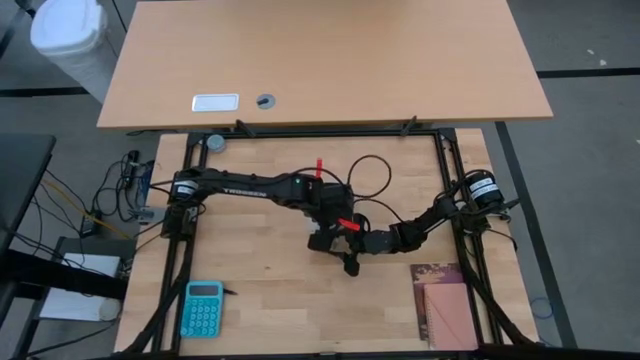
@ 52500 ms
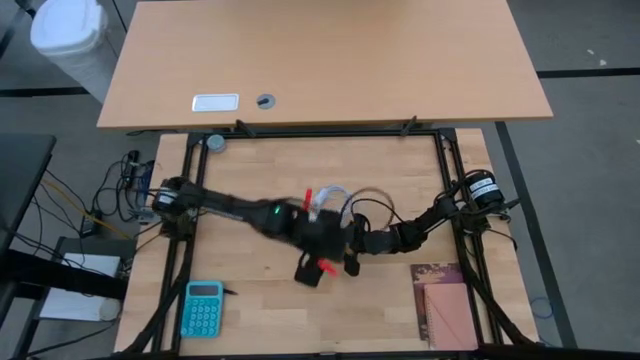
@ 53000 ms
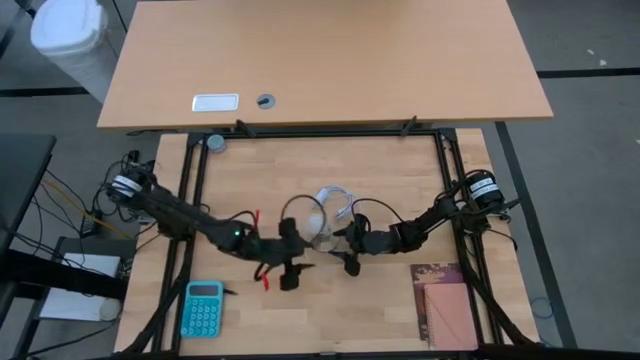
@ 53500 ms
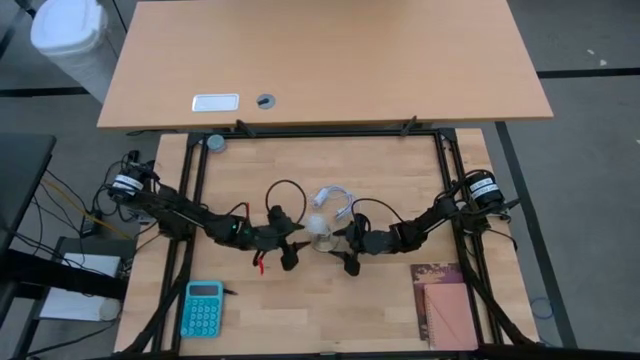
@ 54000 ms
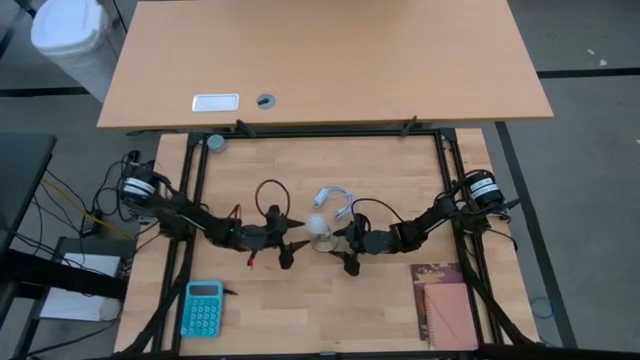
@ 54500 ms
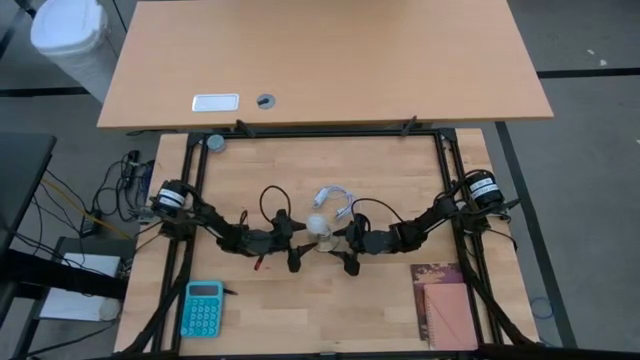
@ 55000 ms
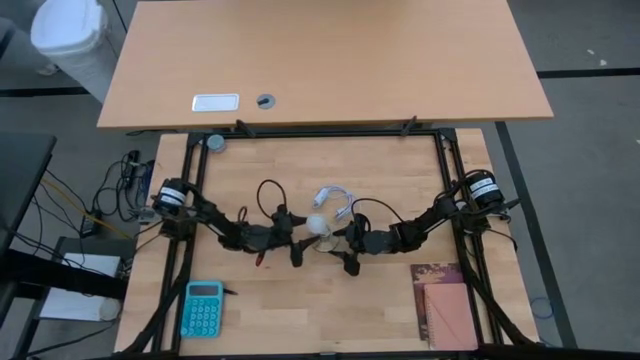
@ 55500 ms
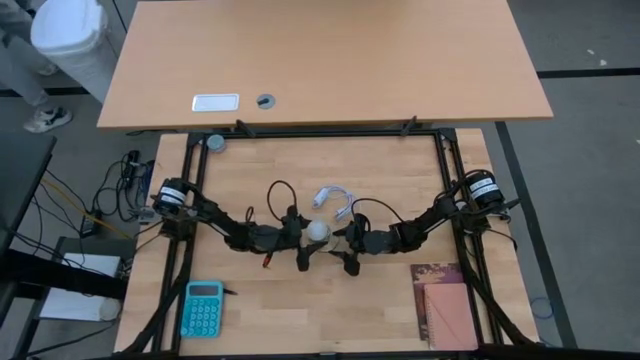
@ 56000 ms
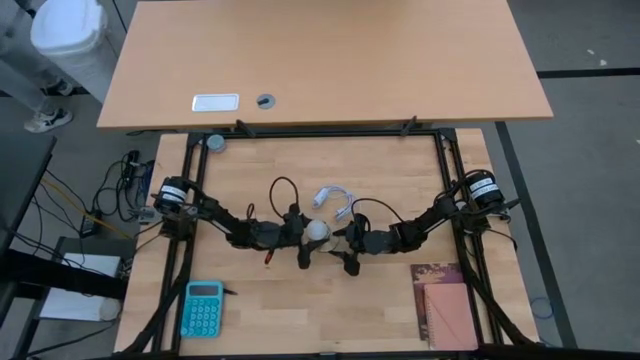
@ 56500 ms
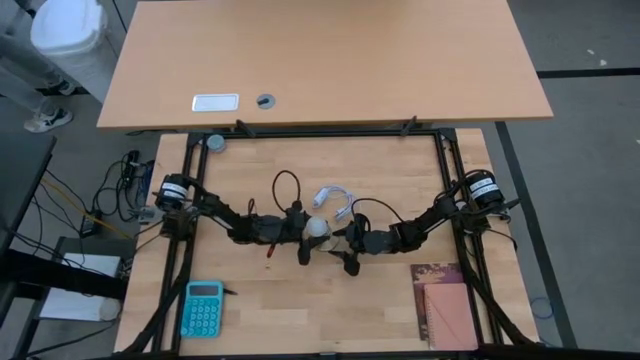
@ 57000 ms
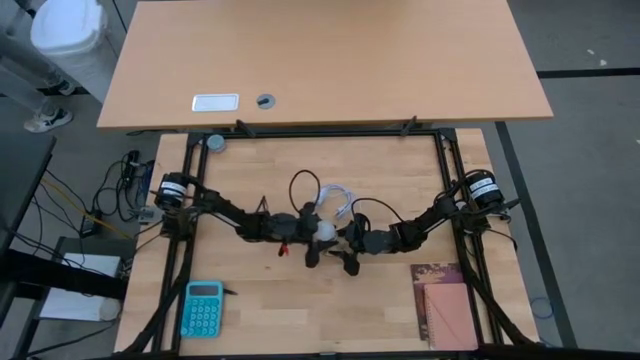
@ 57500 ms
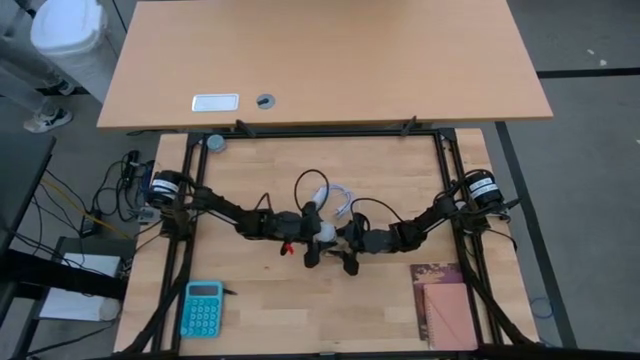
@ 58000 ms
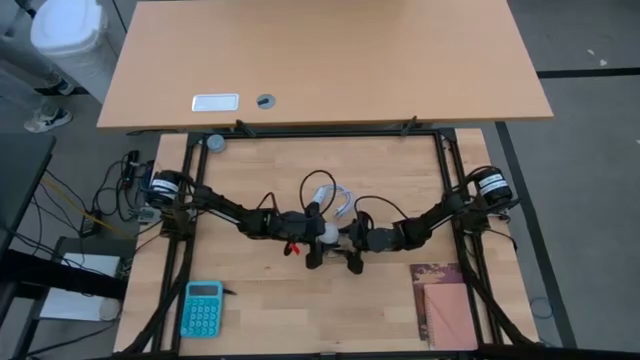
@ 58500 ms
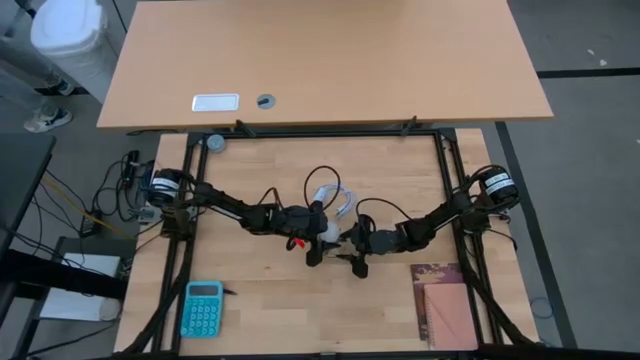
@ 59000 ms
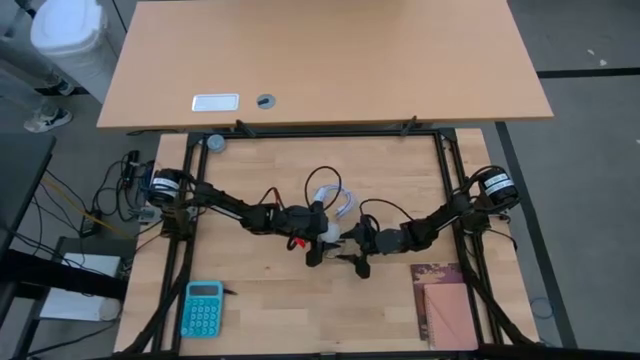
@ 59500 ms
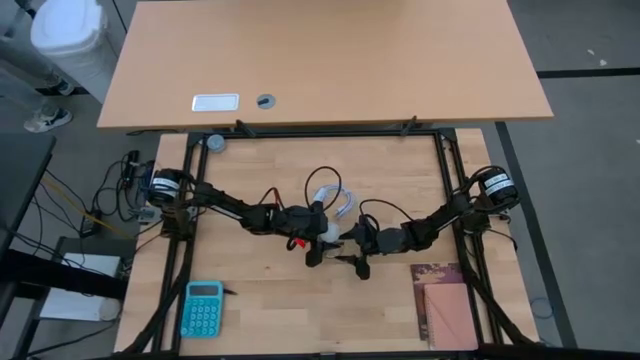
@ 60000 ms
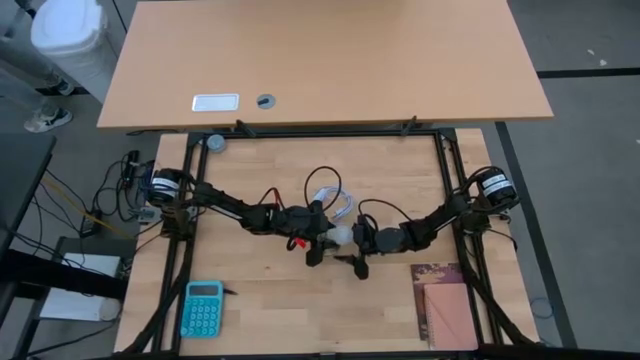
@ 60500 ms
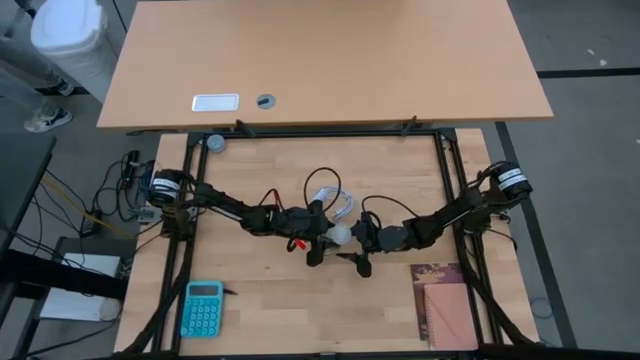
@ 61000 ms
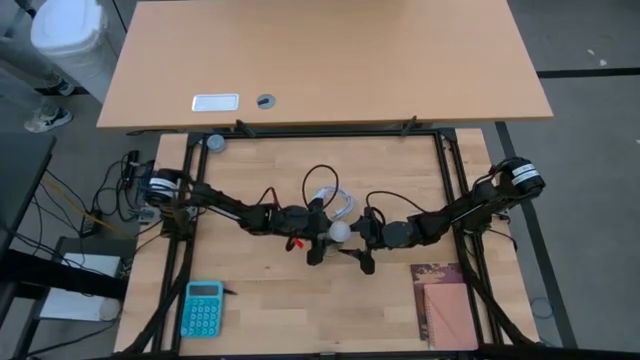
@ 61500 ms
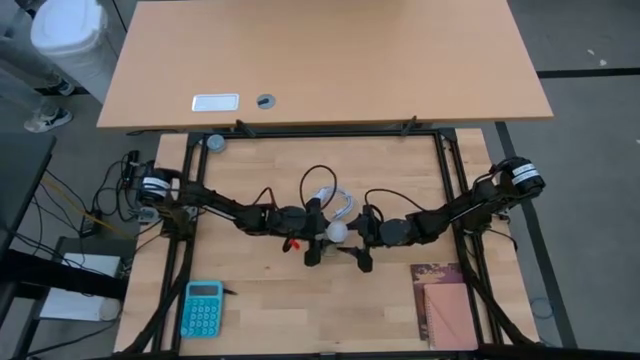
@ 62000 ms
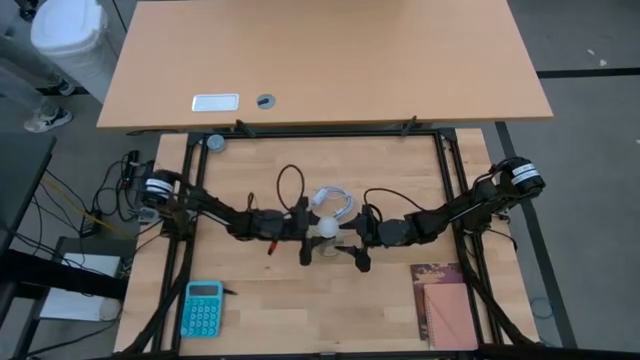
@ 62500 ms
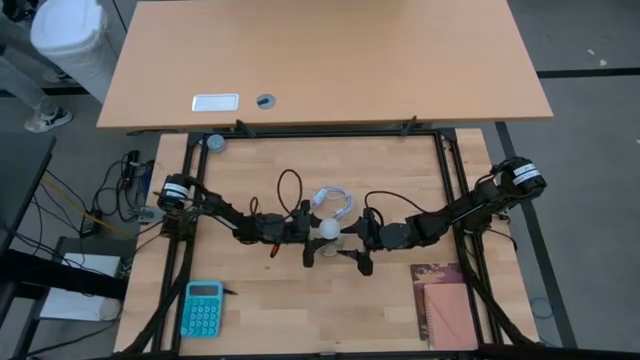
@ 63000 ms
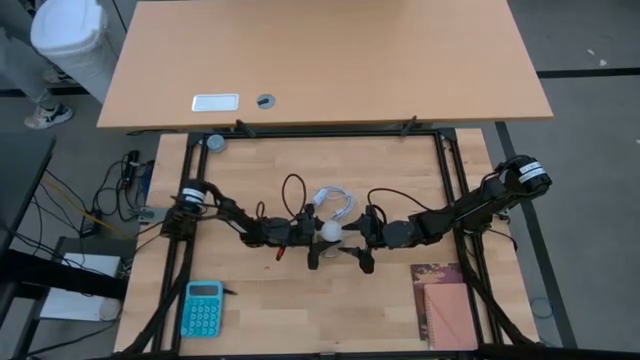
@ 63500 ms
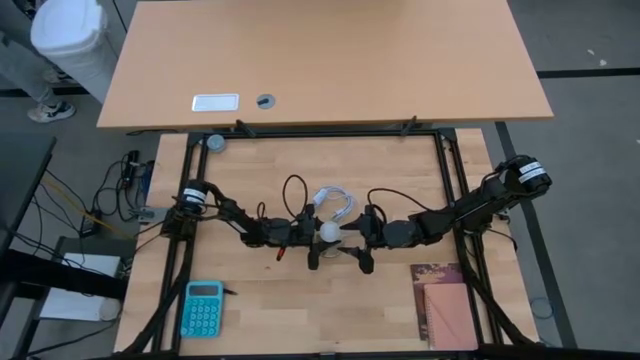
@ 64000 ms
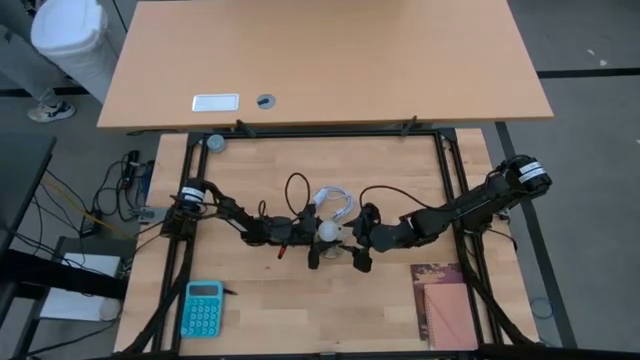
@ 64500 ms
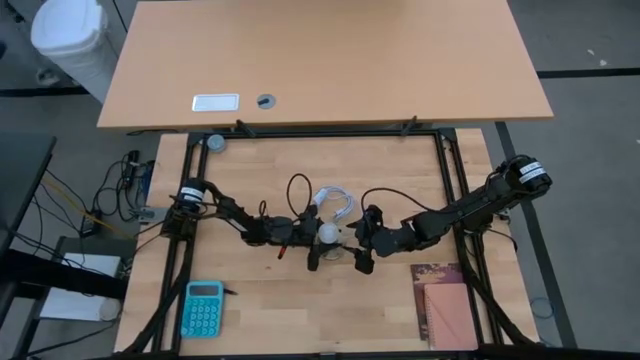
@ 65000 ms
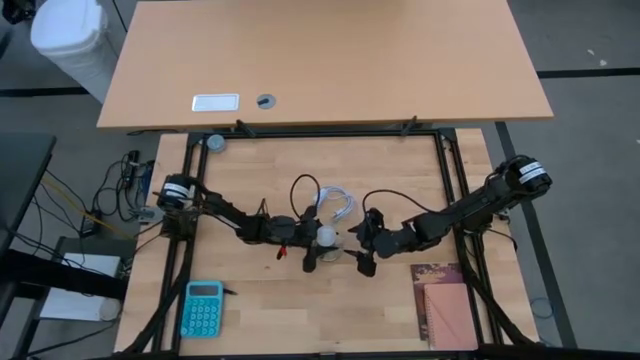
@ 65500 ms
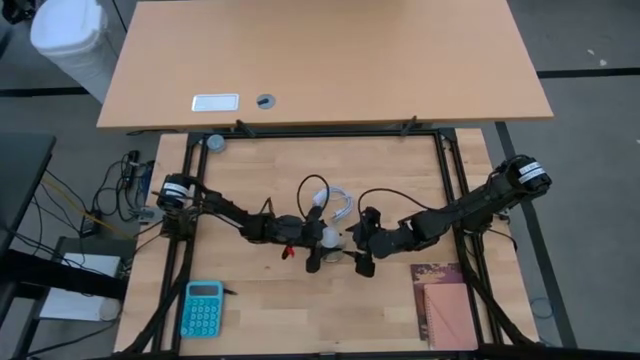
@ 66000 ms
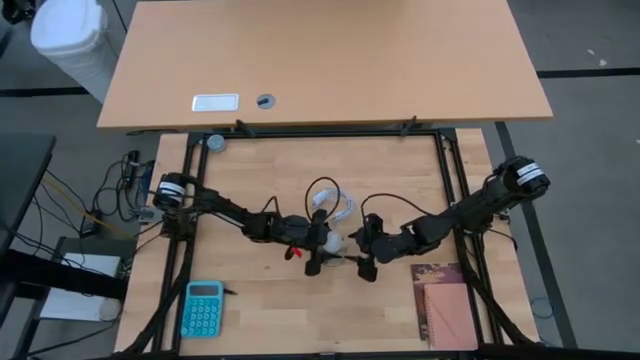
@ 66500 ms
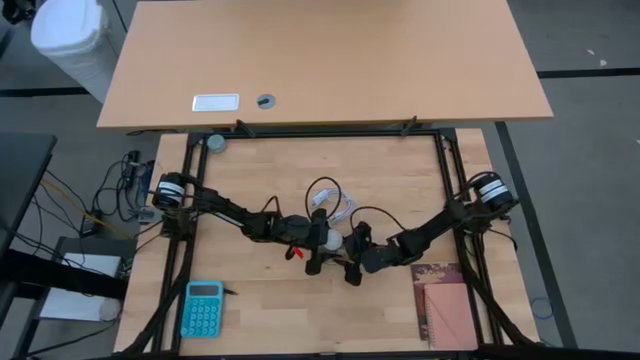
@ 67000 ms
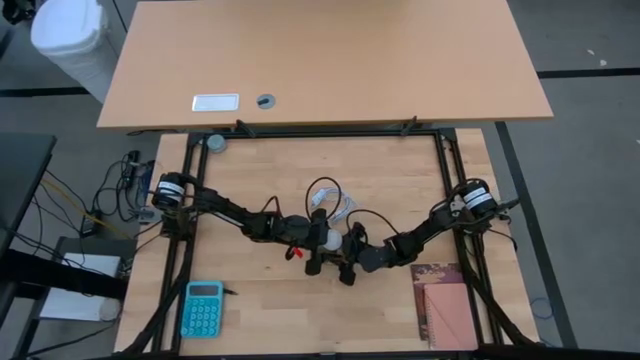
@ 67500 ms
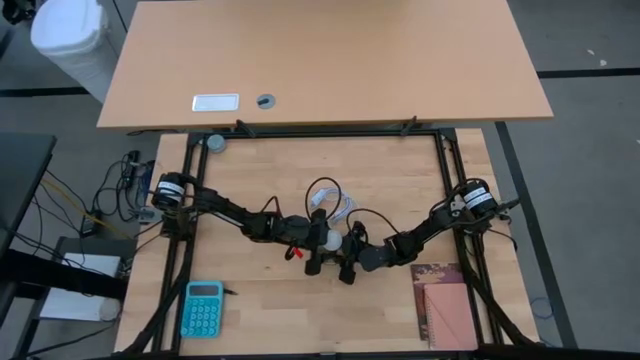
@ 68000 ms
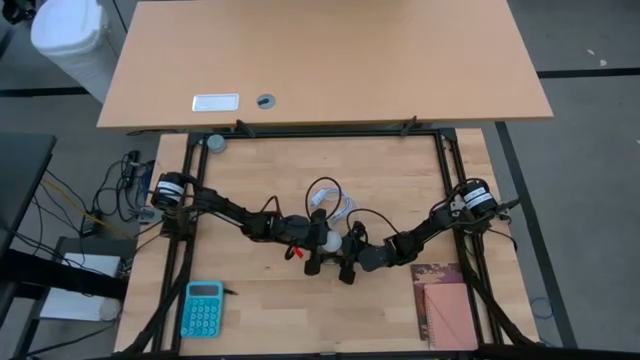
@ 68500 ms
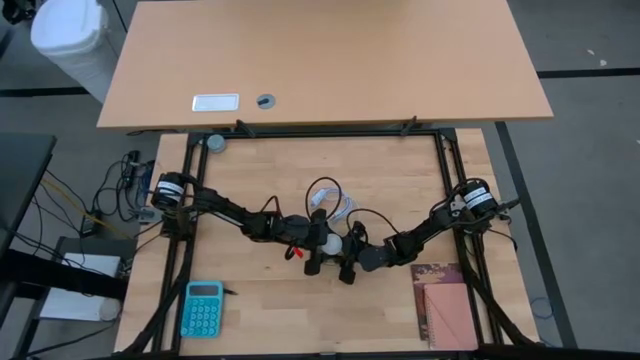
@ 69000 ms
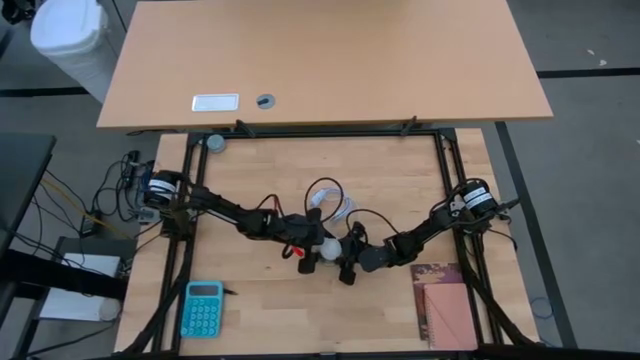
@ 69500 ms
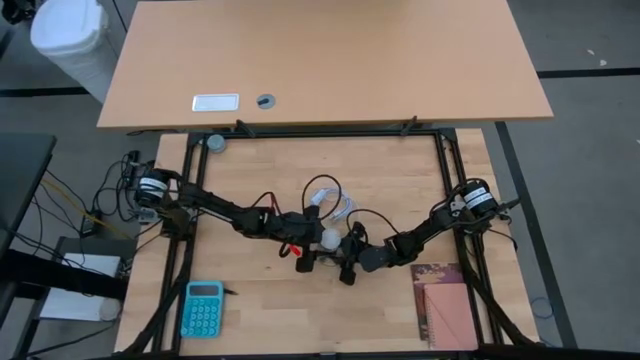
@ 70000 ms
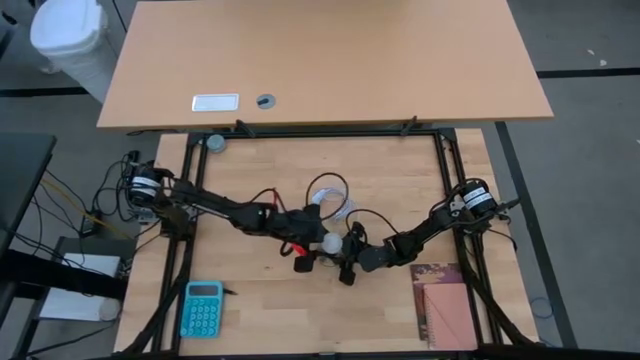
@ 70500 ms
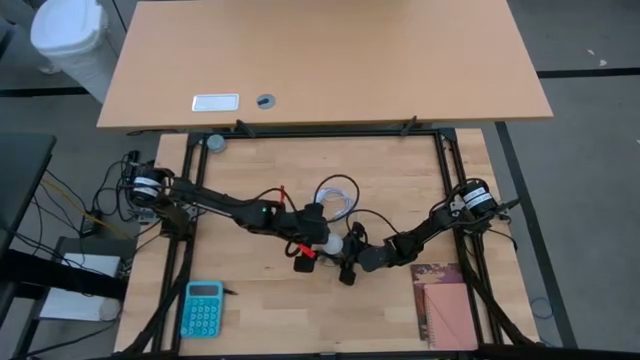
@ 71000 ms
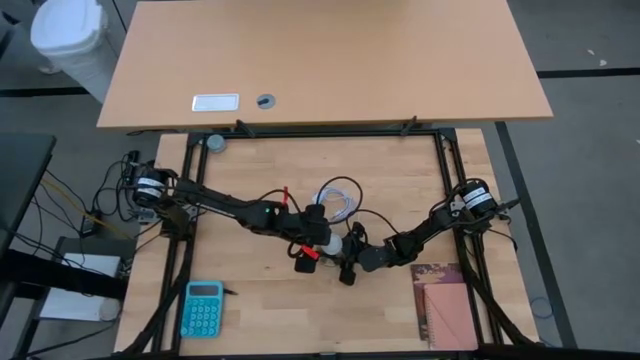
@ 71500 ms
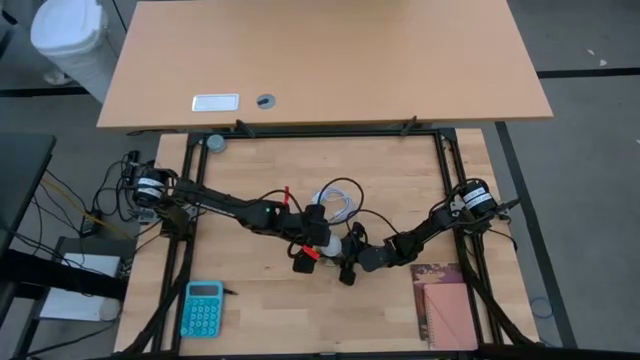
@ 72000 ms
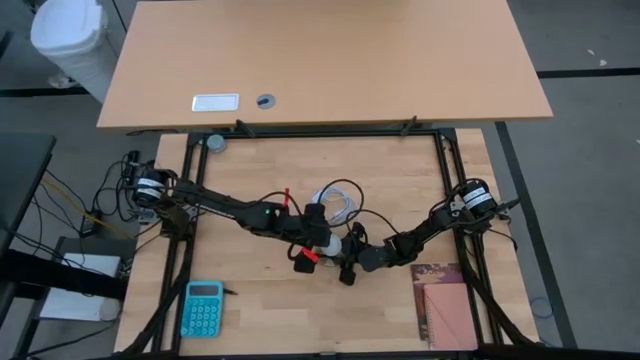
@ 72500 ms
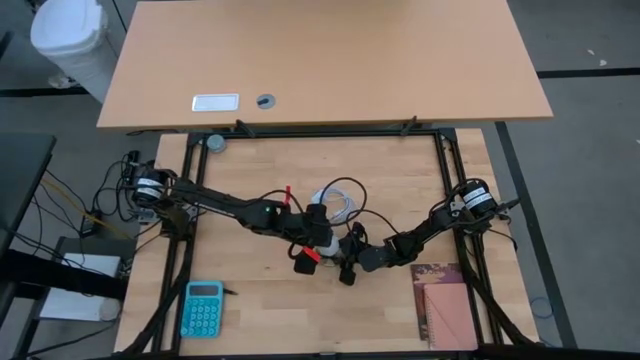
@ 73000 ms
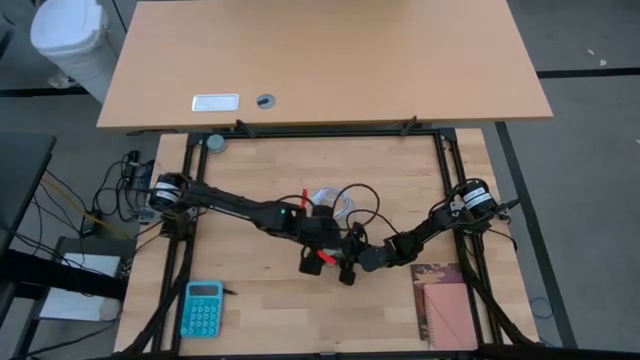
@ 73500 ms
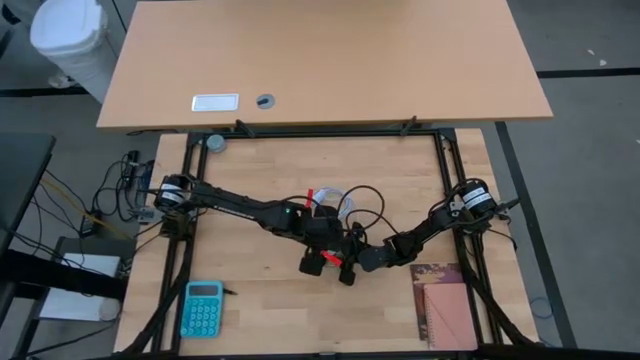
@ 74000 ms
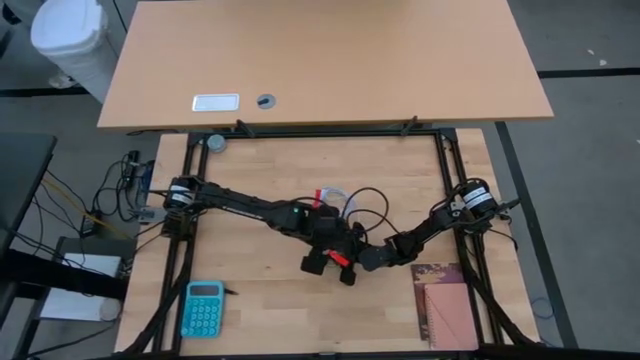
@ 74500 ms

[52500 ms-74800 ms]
Task: Screw lightbulb
Insert the white lightbulb into the lamp socket
